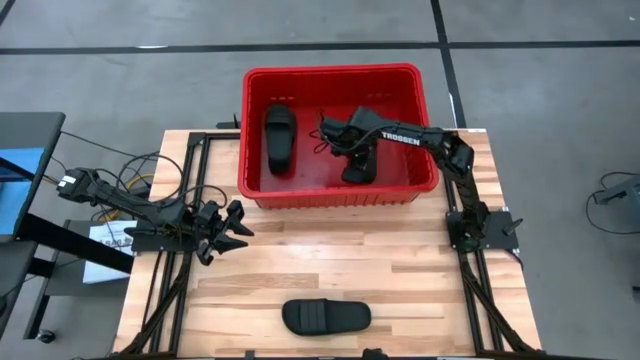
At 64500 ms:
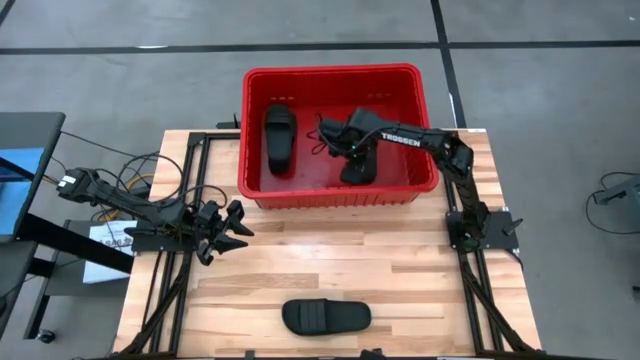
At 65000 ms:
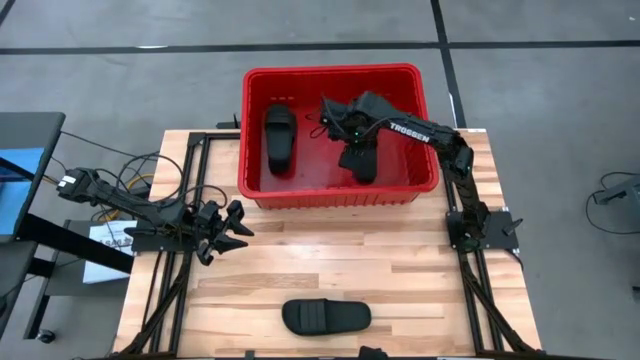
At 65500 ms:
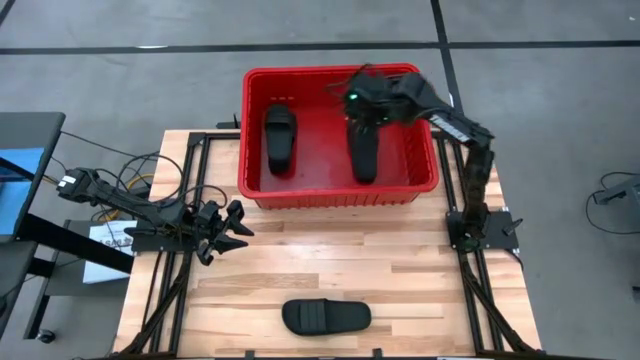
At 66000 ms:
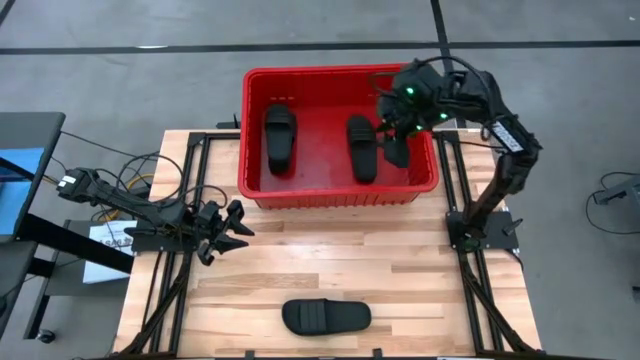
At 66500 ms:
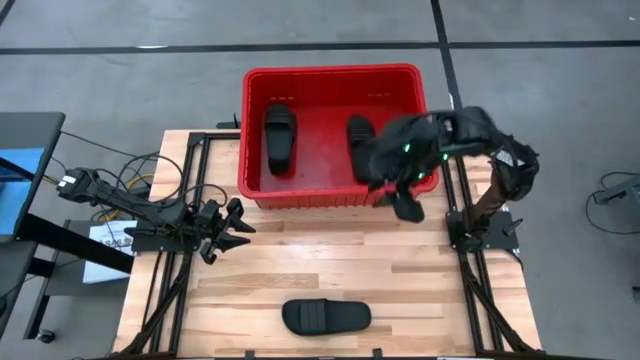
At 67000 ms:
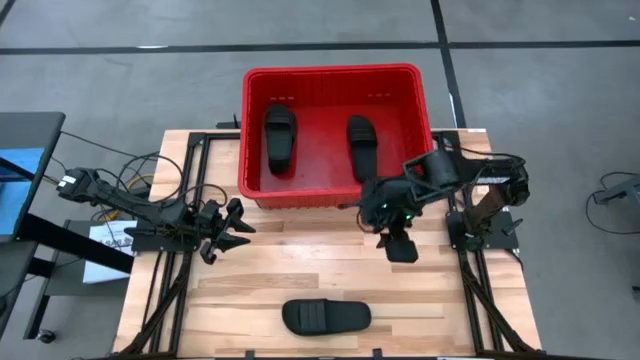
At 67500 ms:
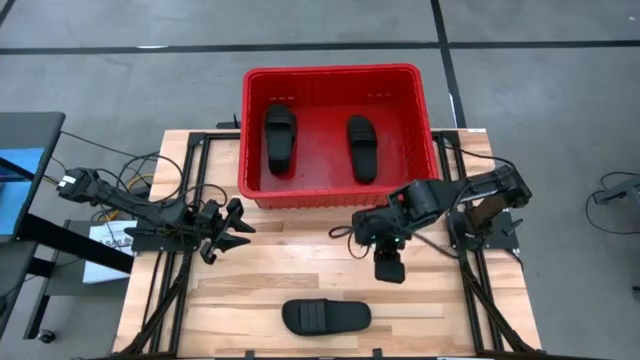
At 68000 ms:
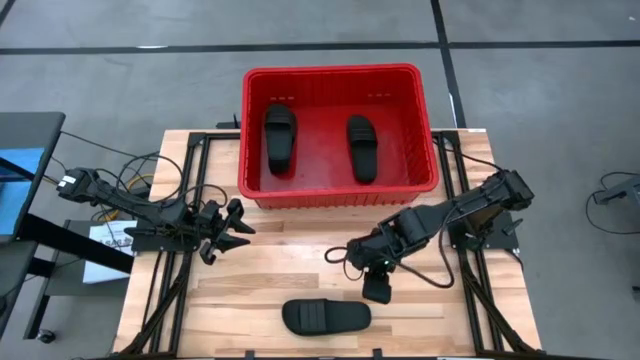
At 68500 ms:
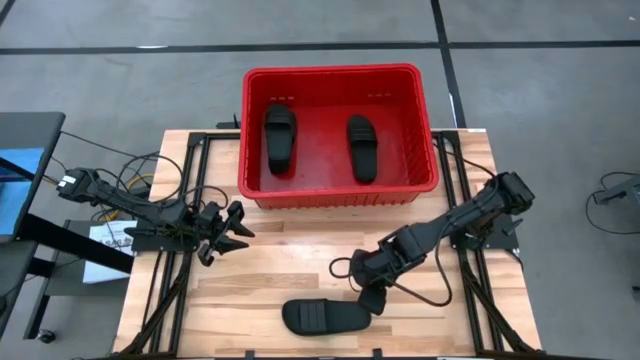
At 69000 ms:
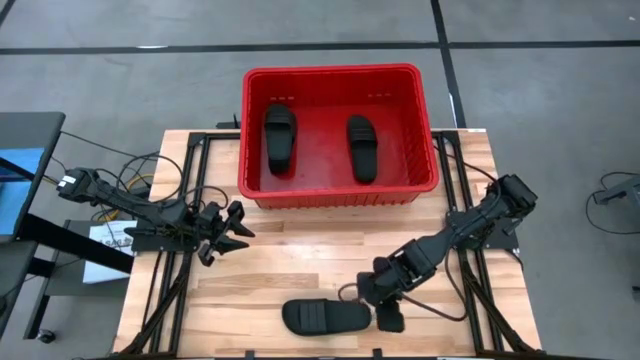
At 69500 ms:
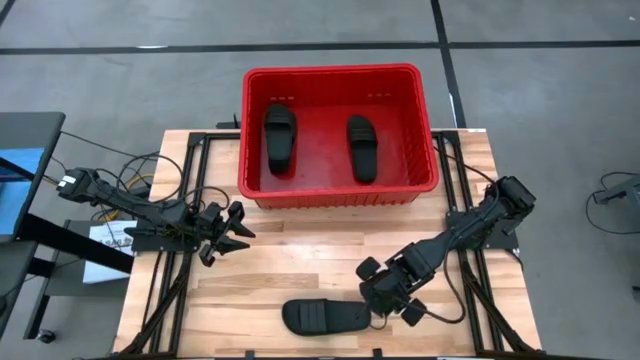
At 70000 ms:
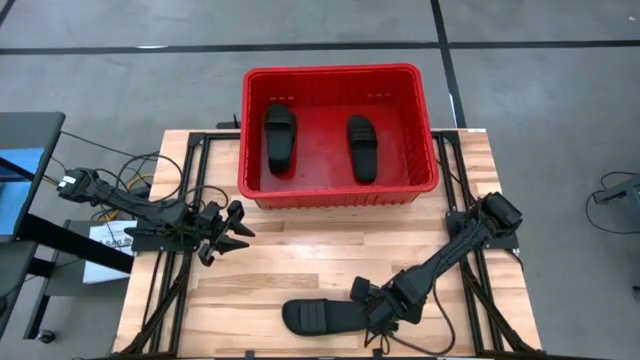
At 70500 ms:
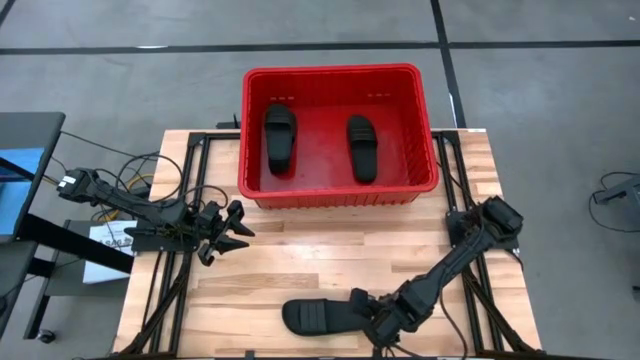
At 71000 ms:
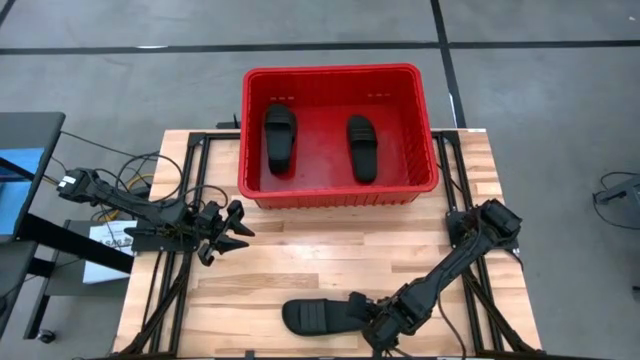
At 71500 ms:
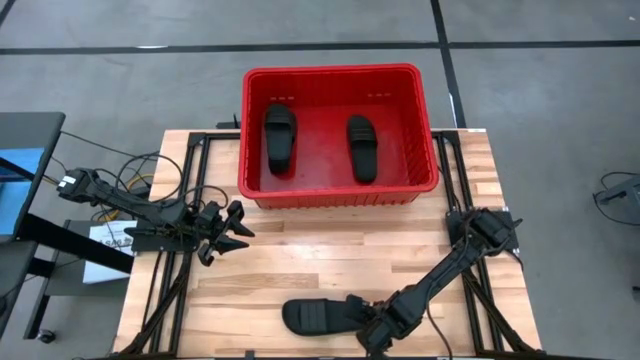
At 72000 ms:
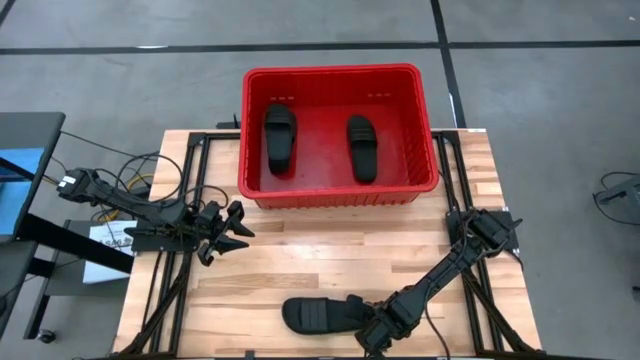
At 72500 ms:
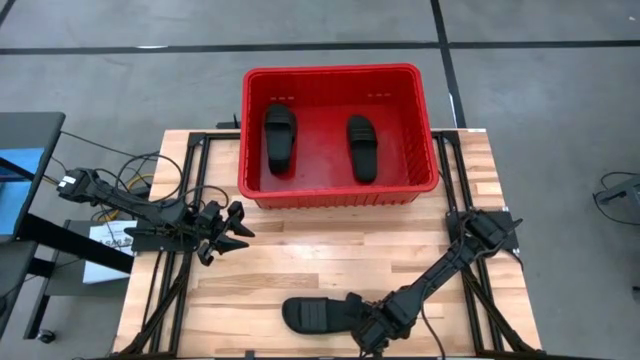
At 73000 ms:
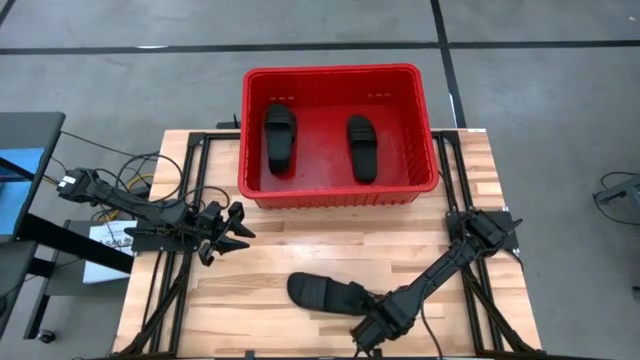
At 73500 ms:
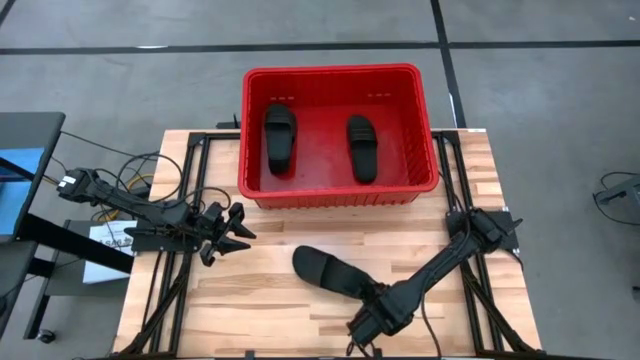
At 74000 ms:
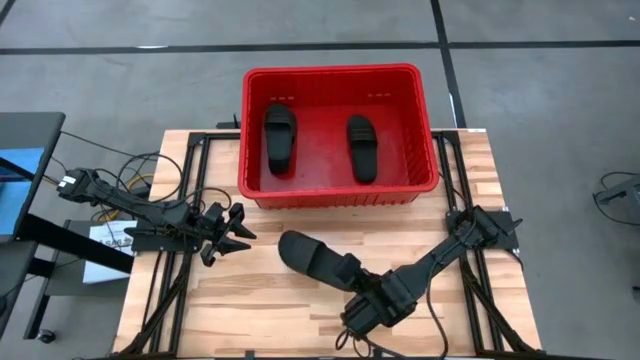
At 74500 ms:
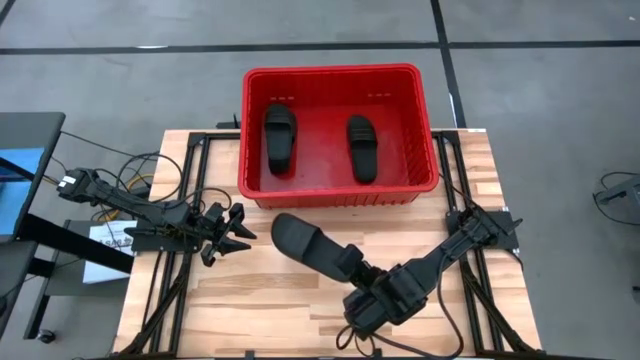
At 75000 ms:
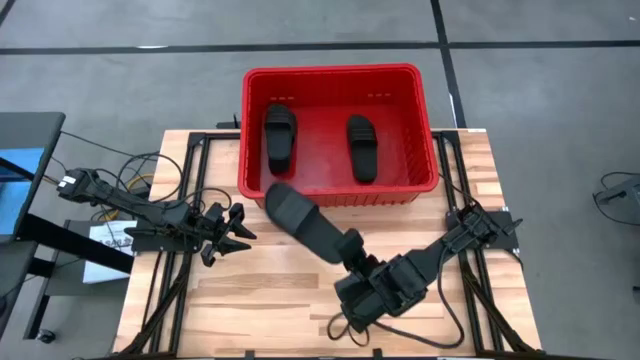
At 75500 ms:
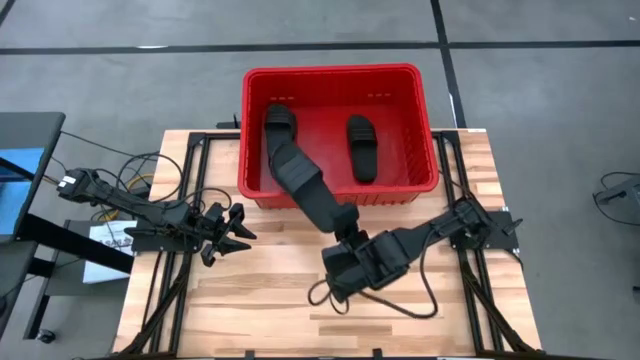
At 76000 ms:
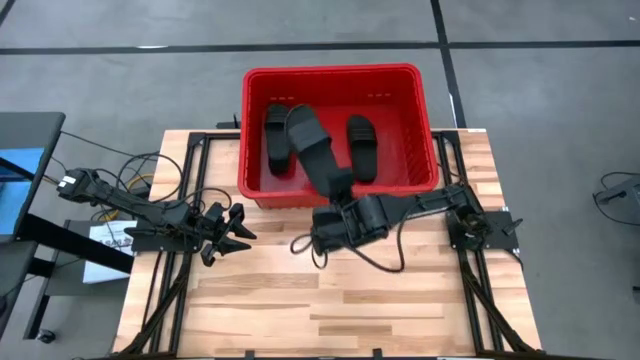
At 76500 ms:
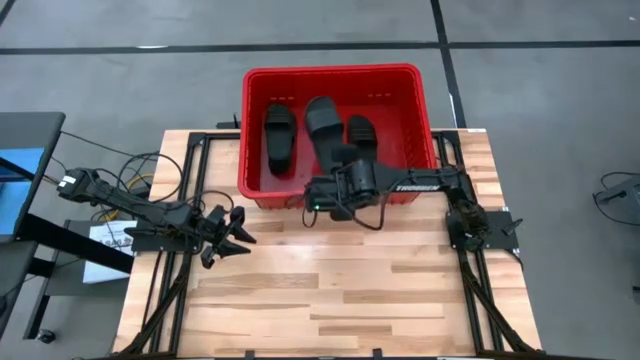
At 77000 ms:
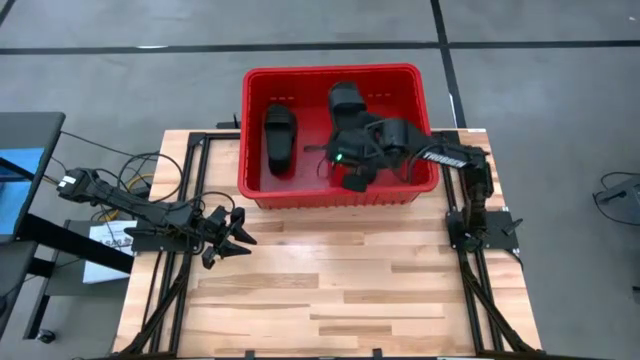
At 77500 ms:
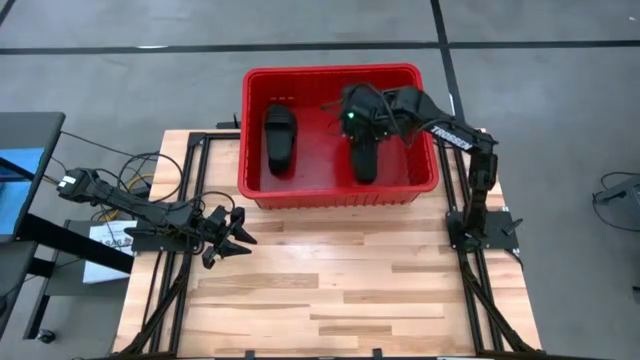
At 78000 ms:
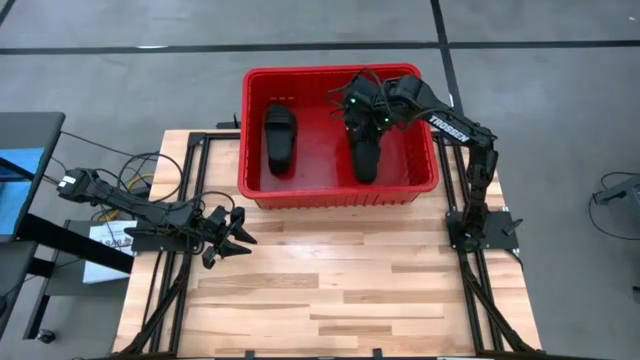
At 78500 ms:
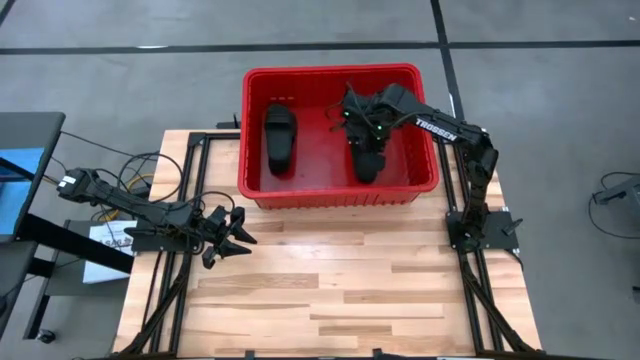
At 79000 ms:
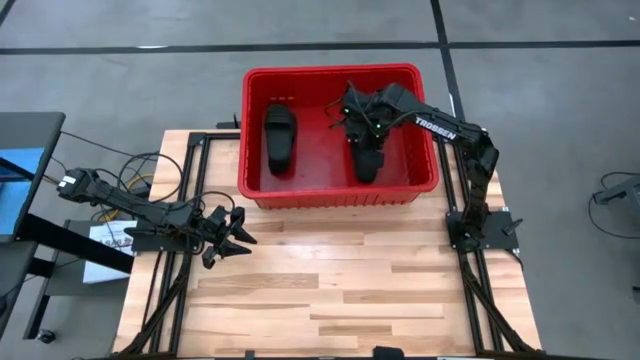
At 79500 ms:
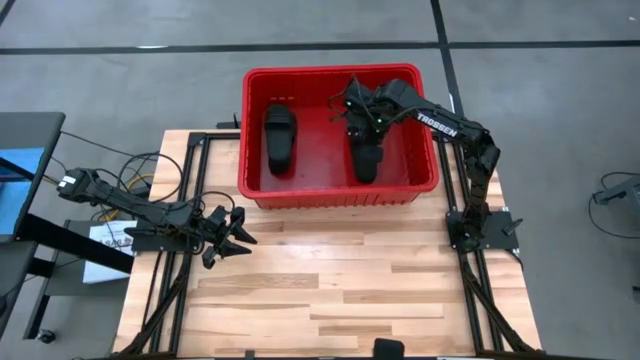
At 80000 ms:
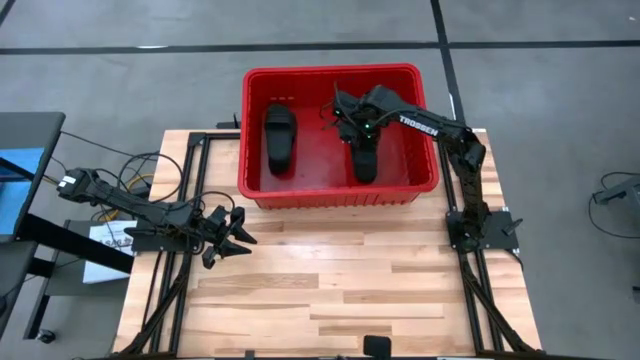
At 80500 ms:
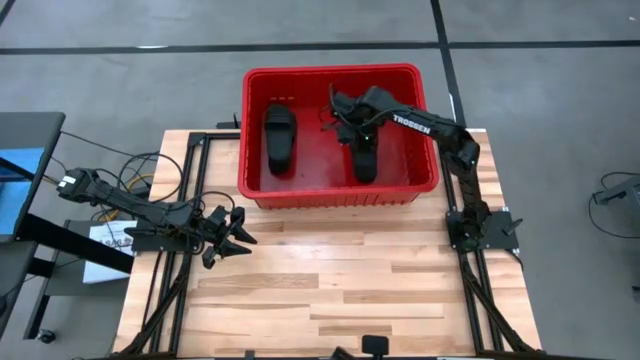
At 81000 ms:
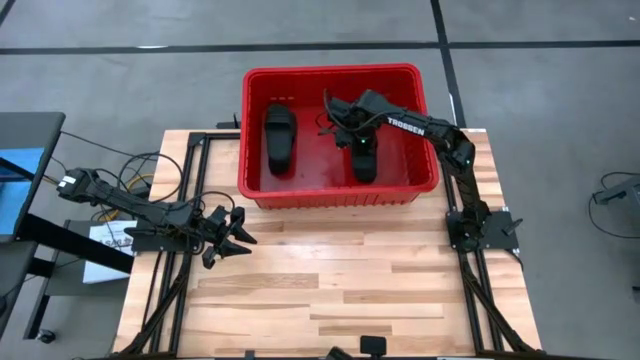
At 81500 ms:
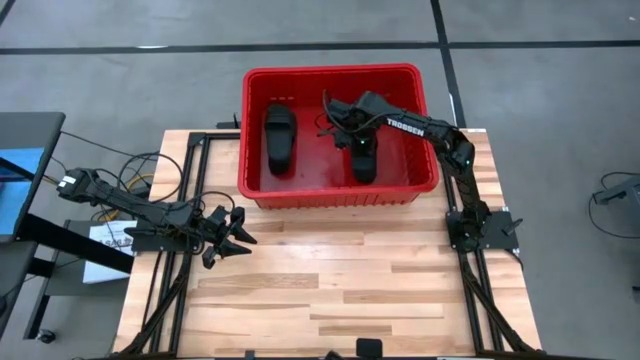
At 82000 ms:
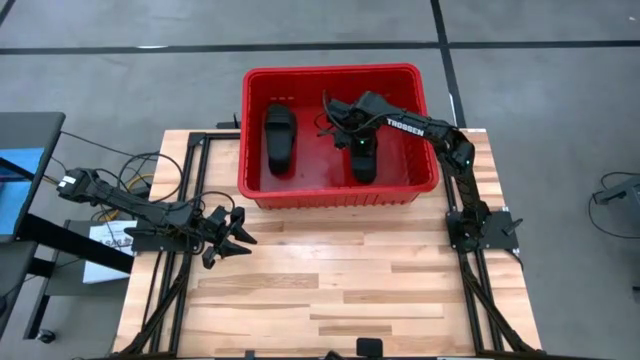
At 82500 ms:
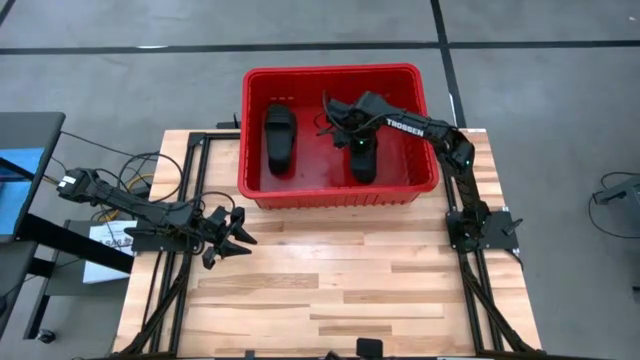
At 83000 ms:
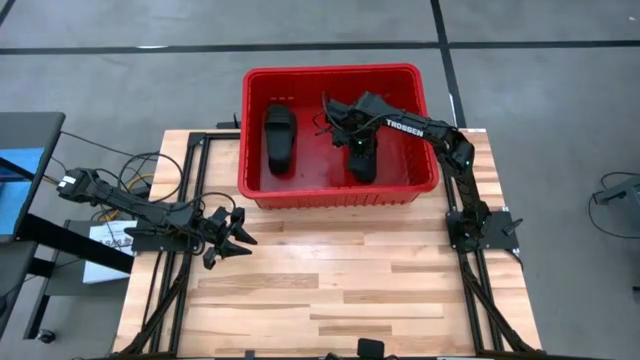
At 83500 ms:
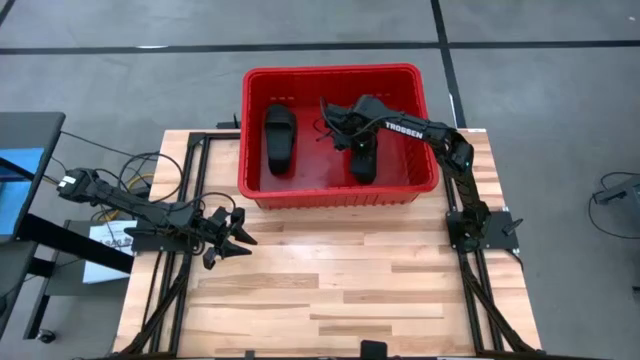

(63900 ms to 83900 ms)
Task: Pick and place slides into bin
Put the black slipper into the red bin

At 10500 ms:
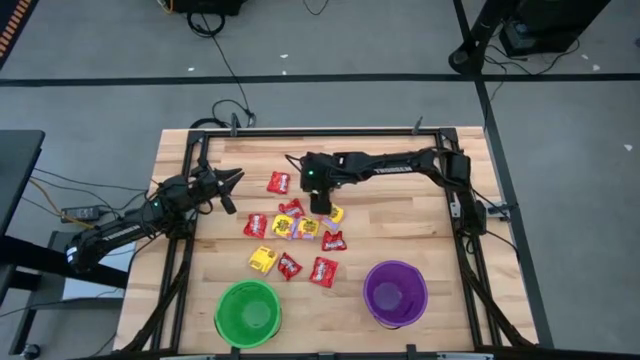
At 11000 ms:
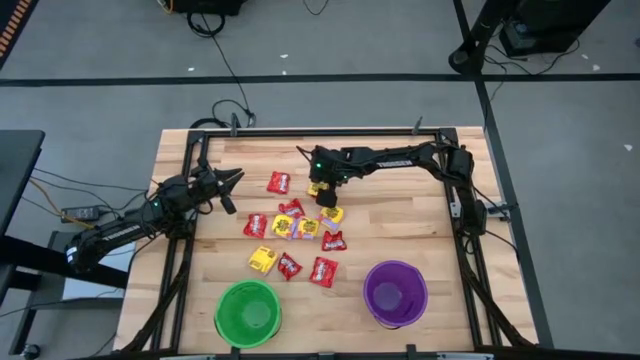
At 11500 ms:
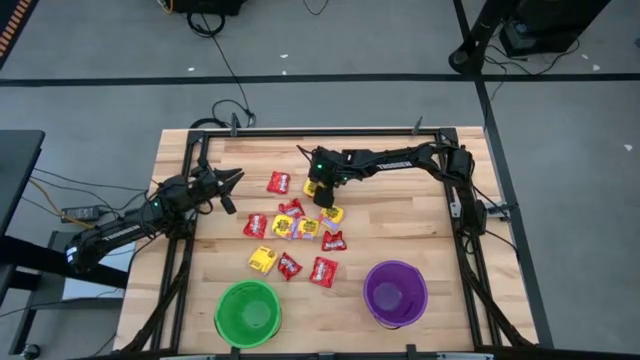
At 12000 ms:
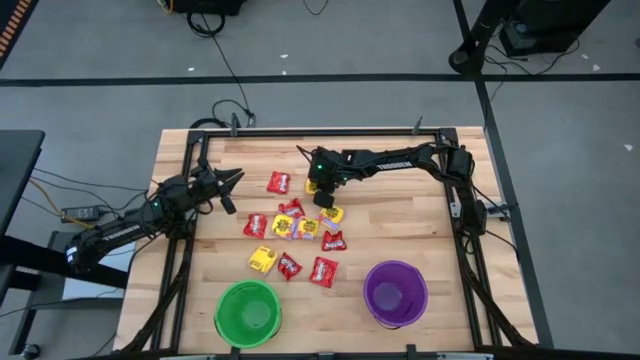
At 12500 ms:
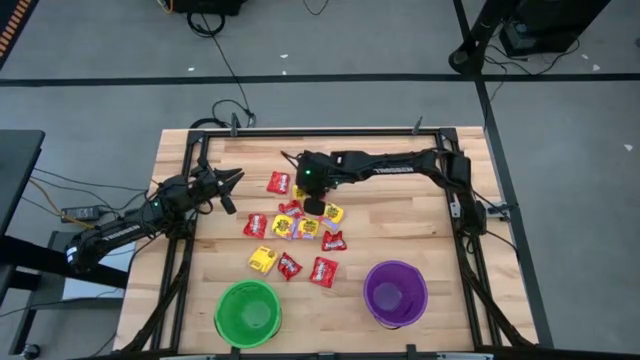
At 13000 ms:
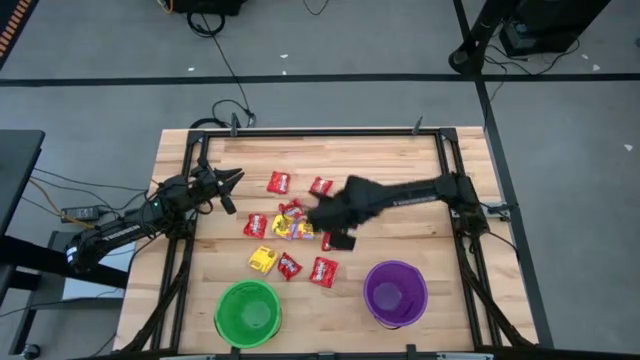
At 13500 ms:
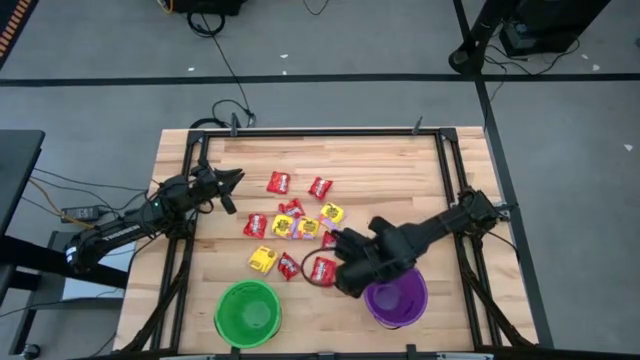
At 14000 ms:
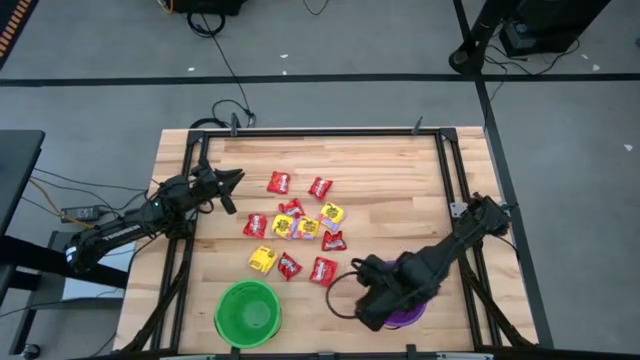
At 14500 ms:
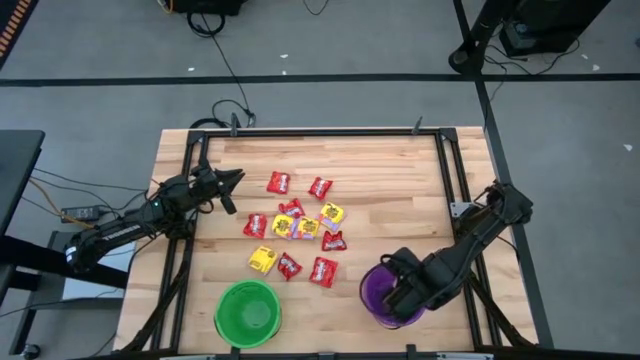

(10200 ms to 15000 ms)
Task: Sort candy by brand, put in halloween buckets
Put the yellow candy into the violet bucket
